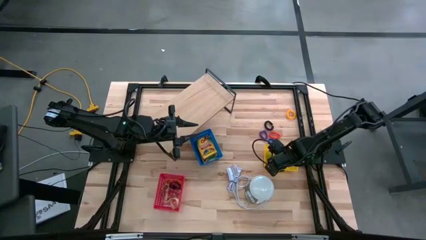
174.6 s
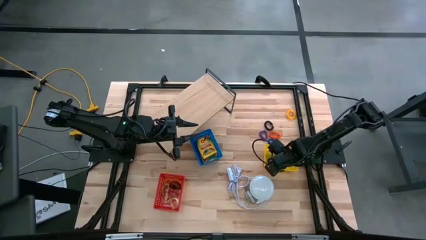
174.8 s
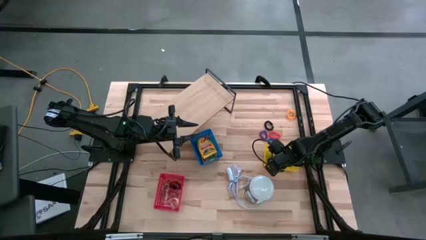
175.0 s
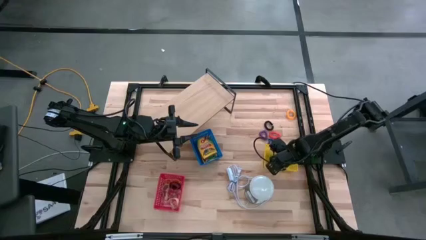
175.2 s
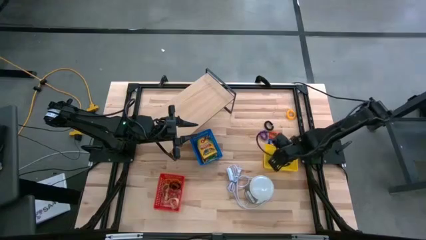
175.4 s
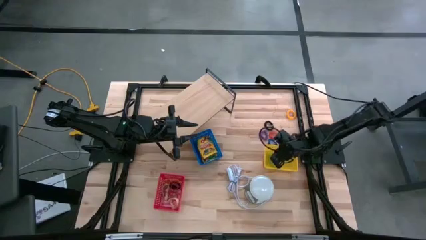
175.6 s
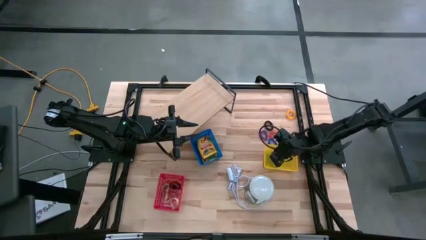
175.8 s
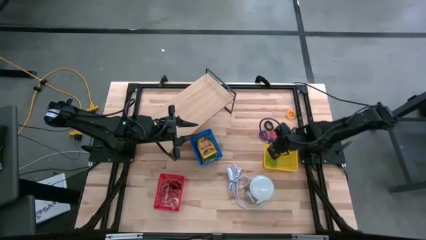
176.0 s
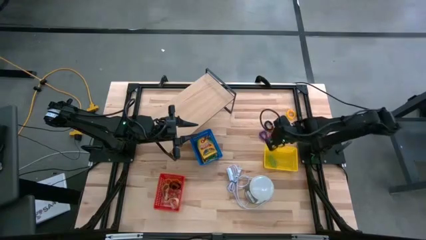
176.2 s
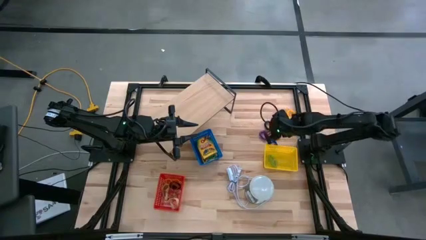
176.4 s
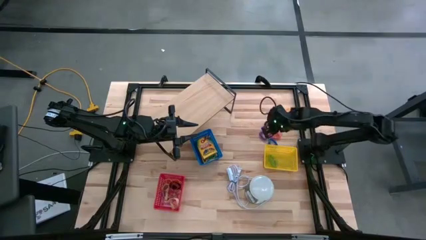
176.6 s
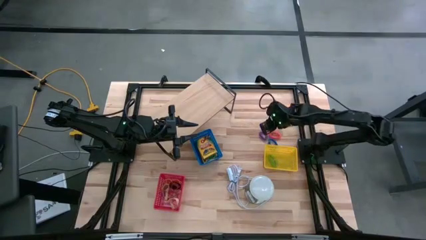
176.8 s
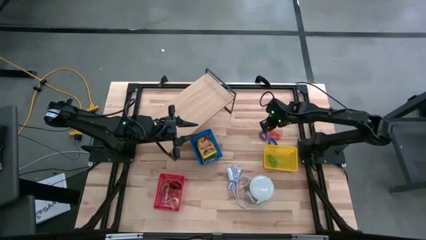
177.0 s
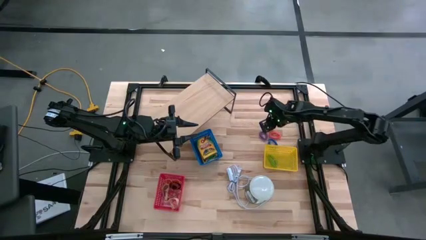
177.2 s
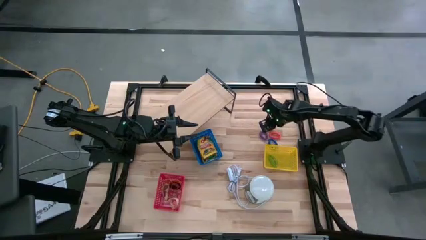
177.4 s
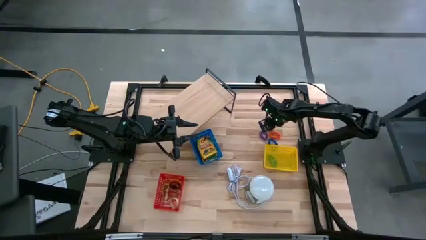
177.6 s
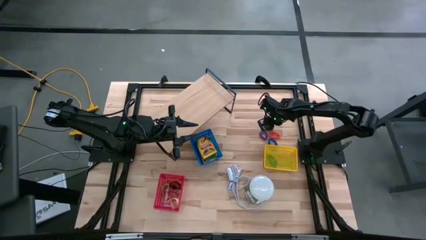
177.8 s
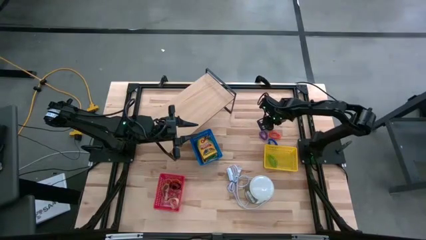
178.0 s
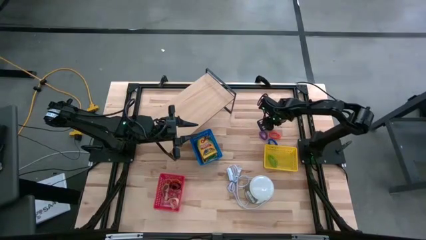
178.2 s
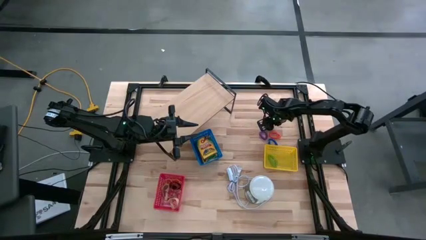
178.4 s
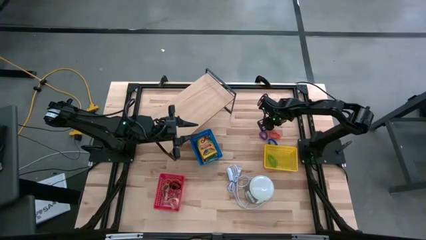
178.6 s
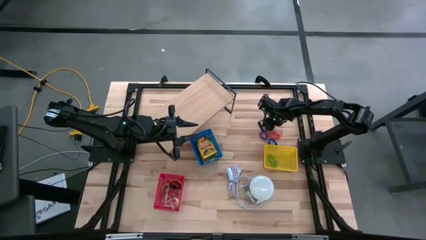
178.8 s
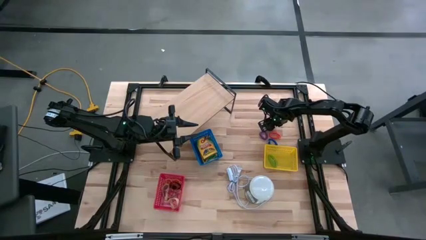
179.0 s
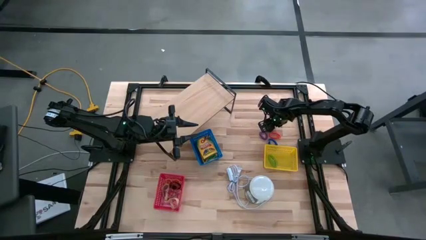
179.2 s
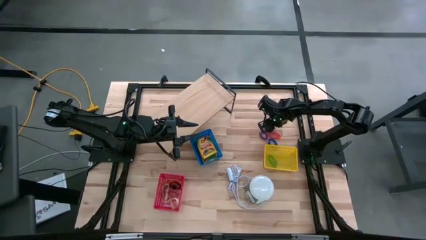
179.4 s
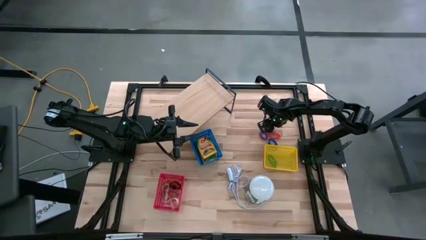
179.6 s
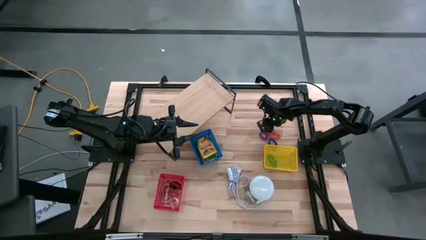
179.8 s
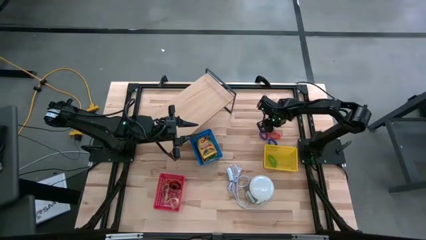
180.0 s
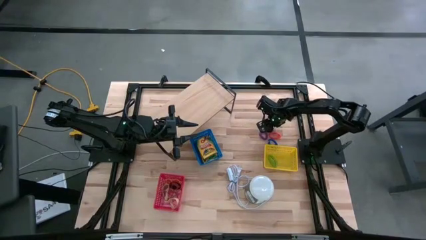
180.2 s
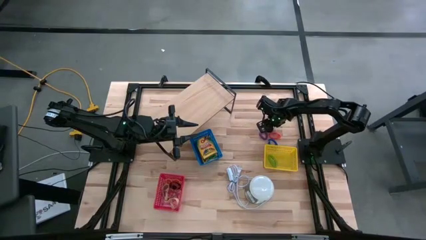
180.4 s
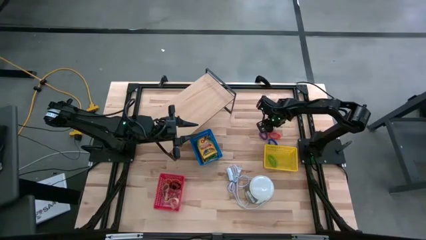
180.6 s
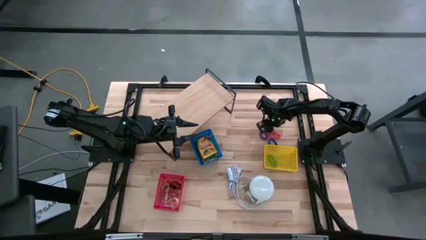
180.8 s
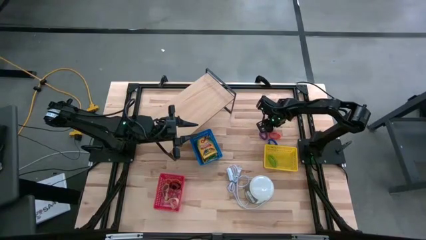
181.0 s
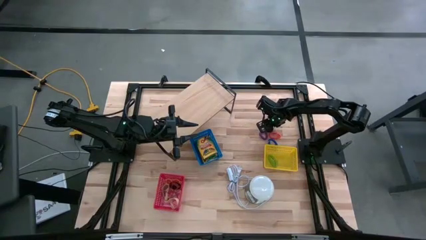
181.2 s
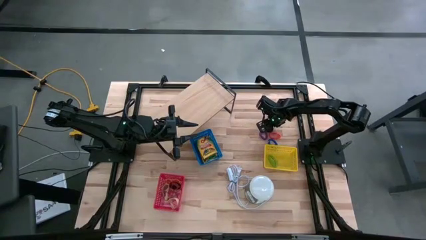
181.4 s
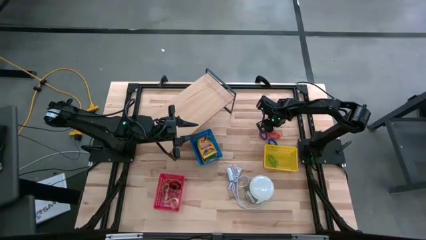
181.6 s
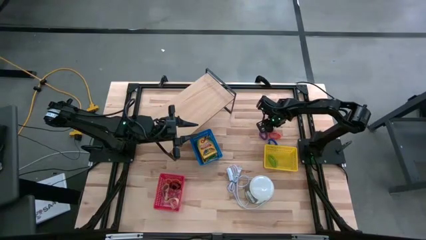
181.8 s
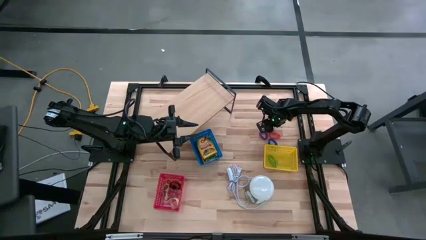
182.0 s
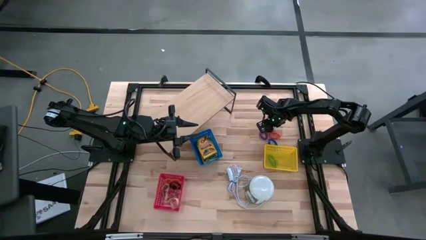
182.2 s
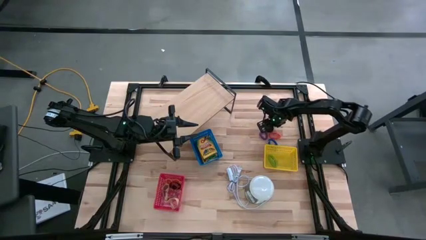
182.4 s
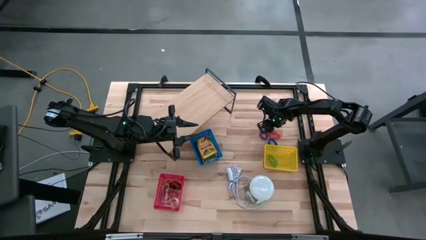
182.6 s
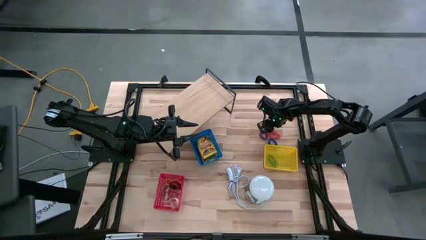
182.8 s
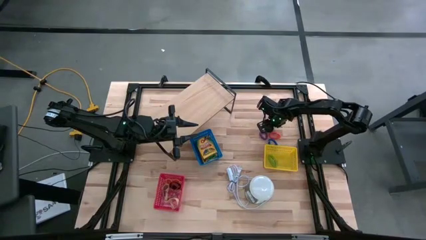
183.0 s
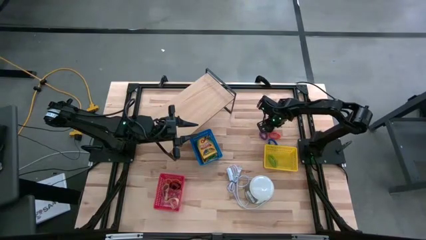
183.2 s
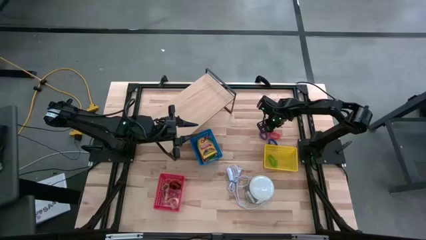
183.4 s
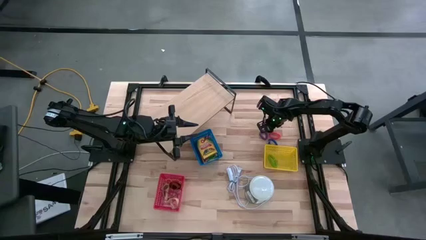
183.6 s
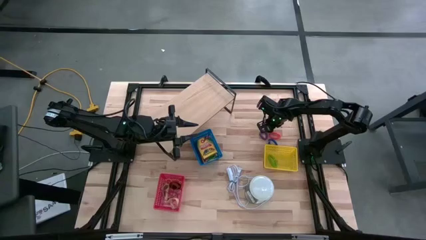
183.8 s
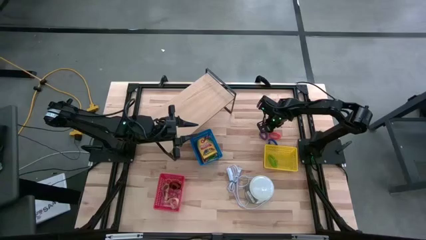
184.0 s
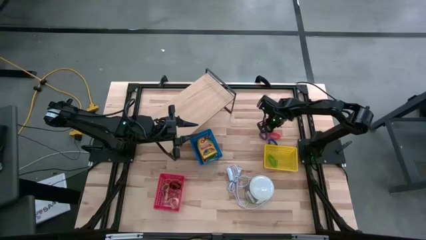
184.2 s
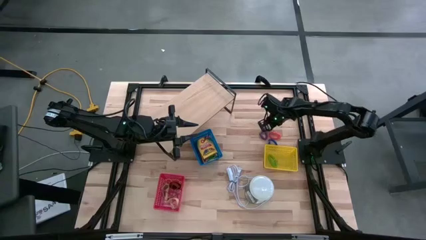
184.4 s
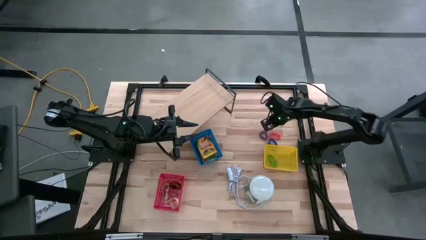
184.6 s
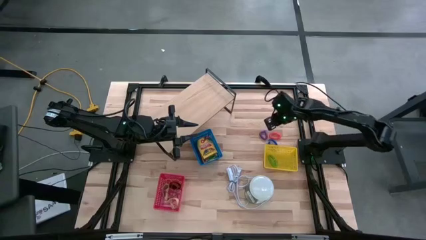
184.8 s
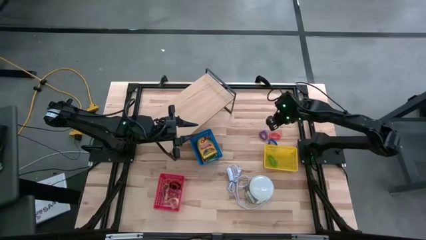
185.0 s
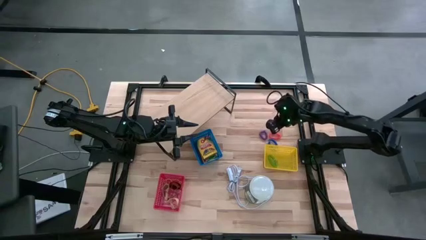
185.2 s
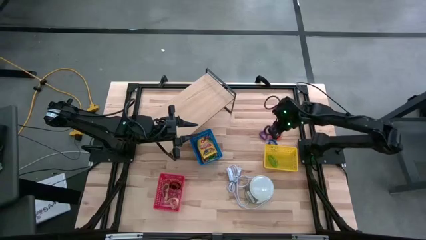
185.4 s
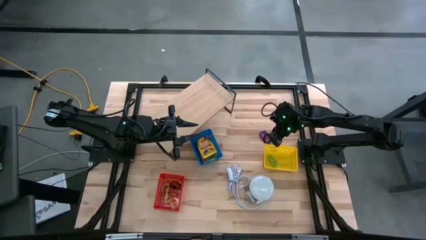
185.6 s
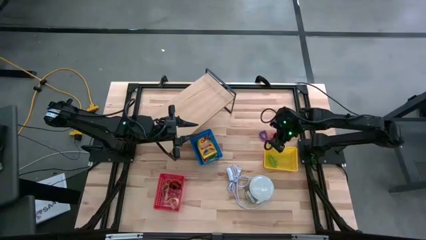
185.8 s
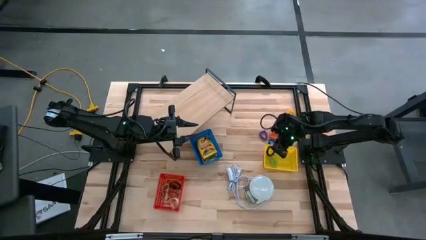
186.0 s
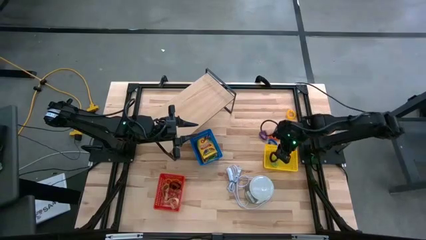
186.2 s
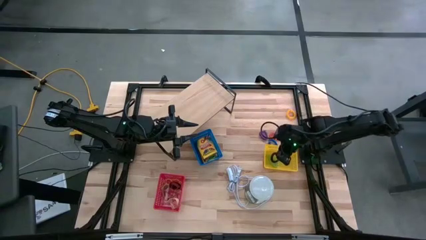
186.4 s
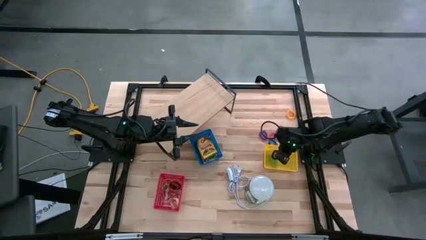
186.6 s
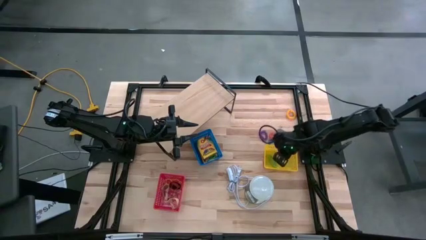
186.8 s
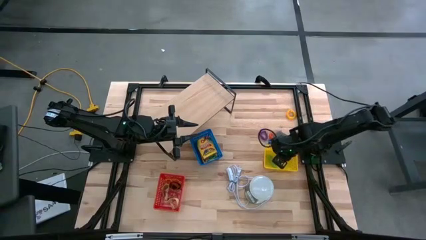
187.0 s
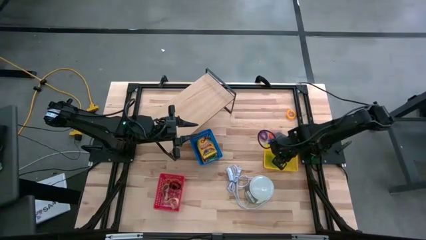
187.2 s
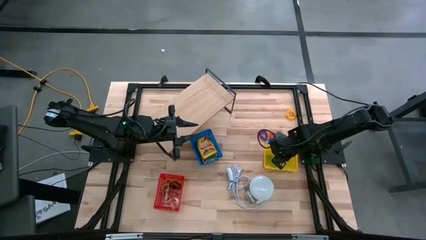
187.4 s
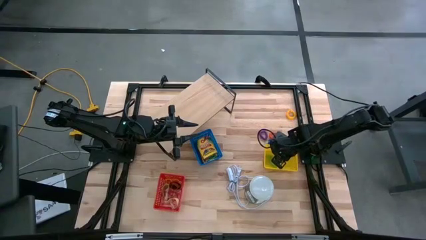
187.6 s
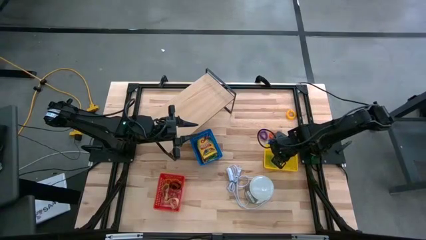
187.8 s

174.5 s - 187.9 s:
Task: Pick & Place Office Desk Supplies
Put the black spring keychain into the yellow bin

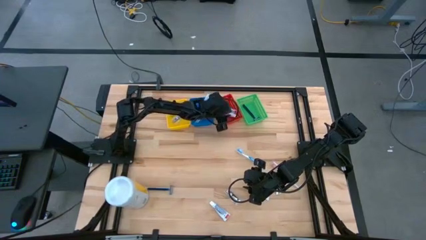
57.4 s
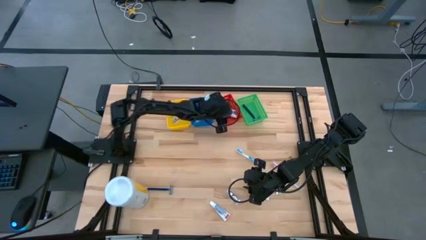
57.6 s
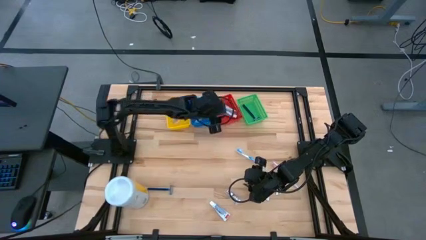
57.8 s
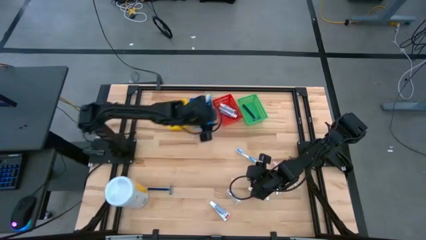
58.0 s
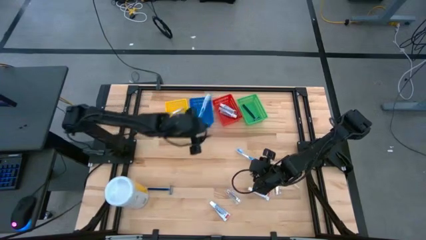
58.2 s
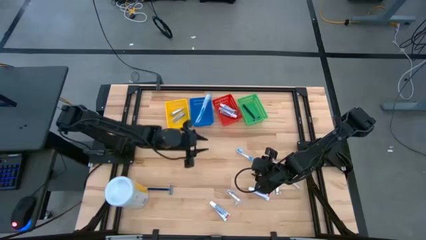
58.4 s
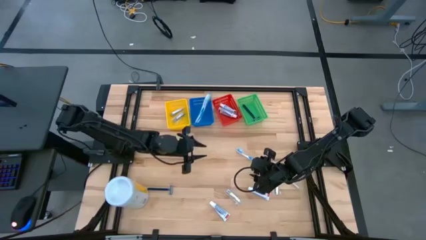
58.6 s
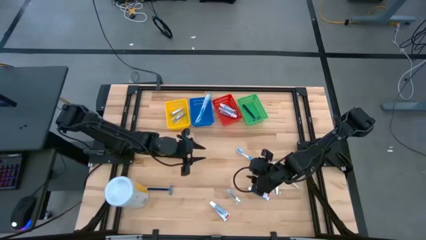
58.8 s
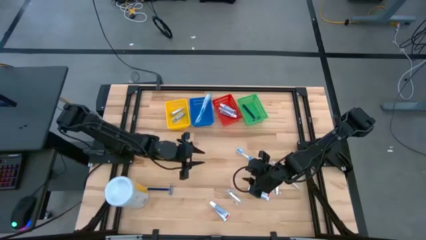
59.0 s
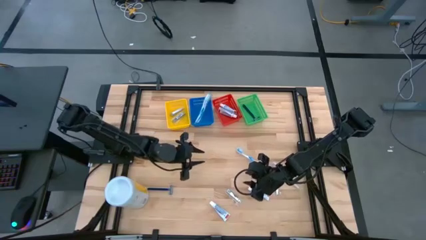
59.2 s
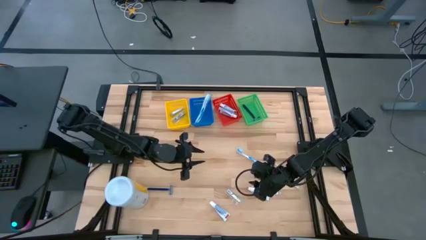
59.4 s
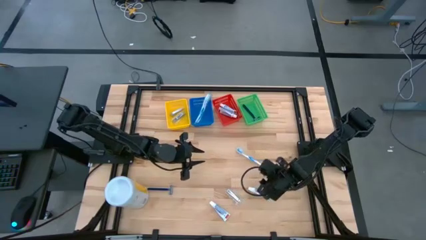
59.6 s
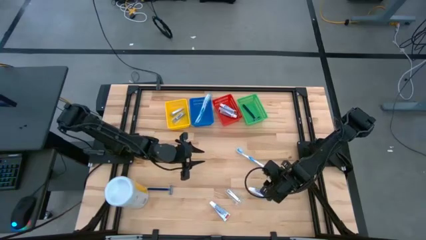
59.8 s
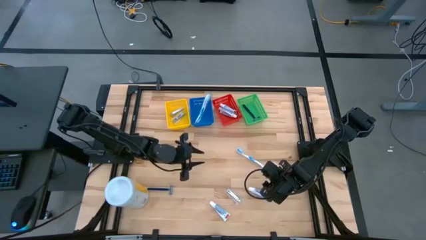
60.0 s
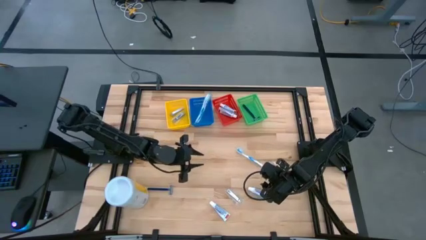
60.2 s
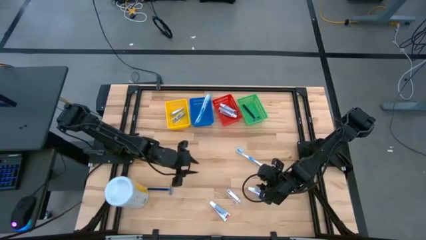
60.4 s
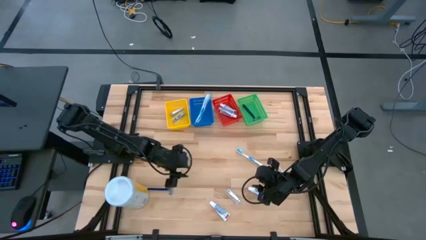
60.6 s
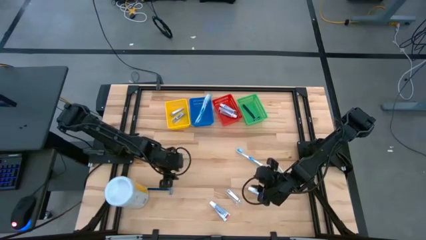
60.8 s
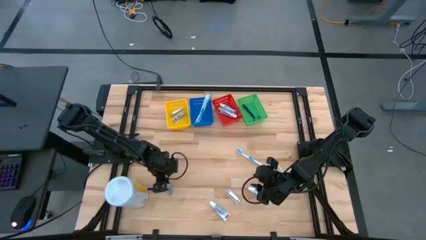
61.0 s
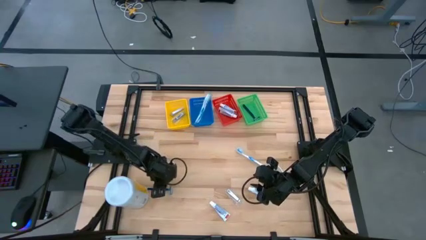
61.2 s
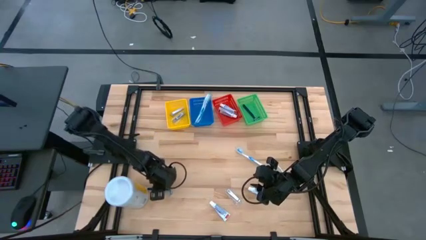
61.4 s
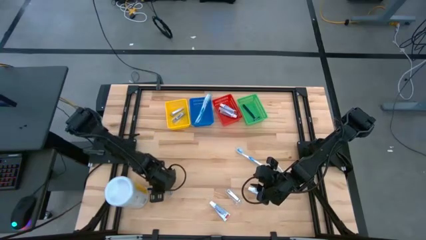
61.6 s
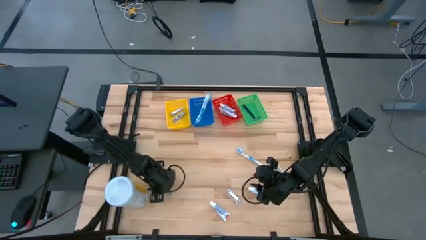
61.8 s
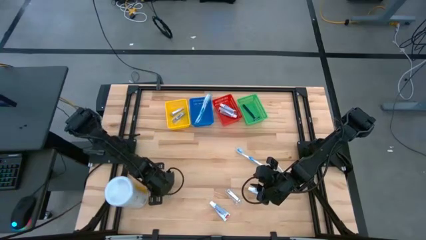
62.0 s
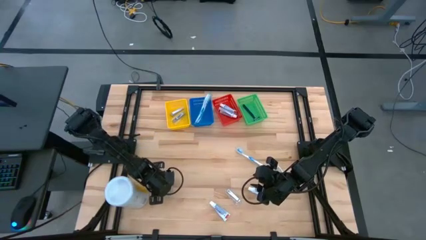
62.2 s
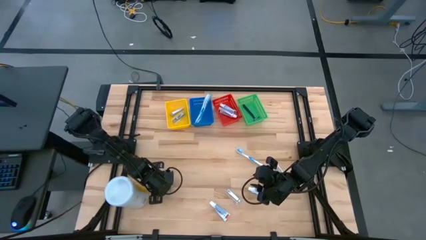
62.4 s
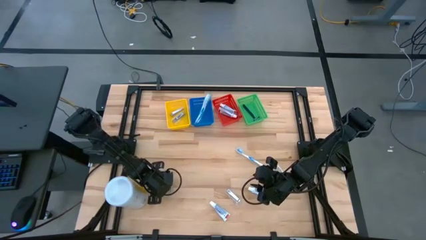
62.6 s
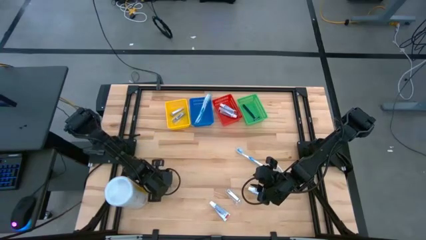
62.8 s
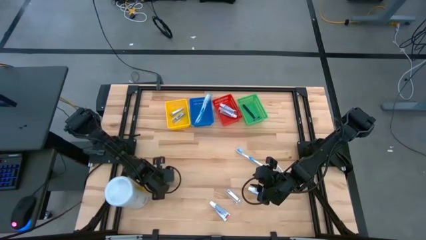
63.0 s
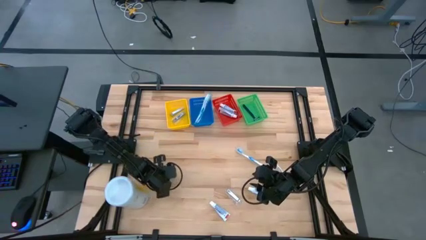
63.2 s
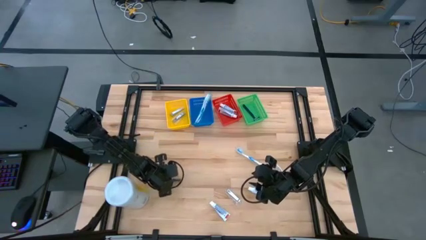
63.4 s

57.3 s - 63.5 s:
Task: Pick & Place Travel size toiletries
Put the razor blade into the green bin
